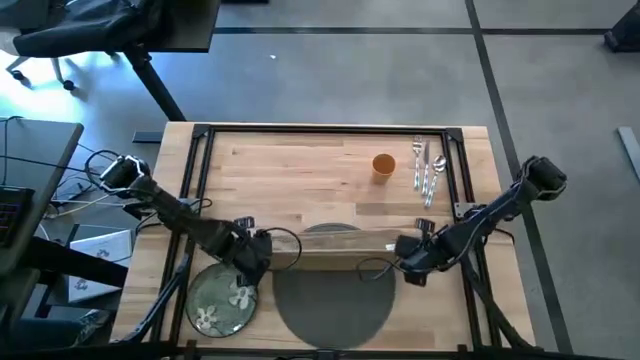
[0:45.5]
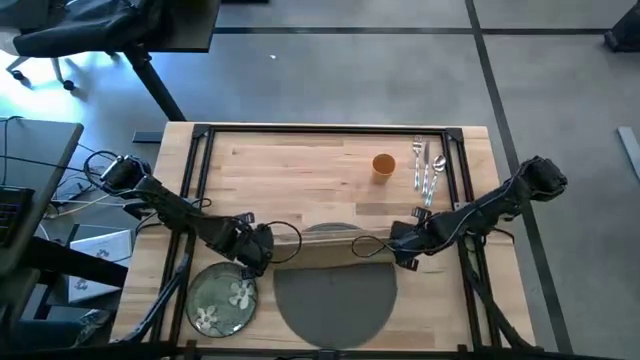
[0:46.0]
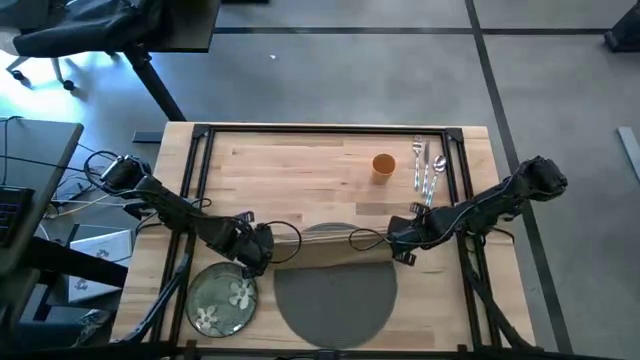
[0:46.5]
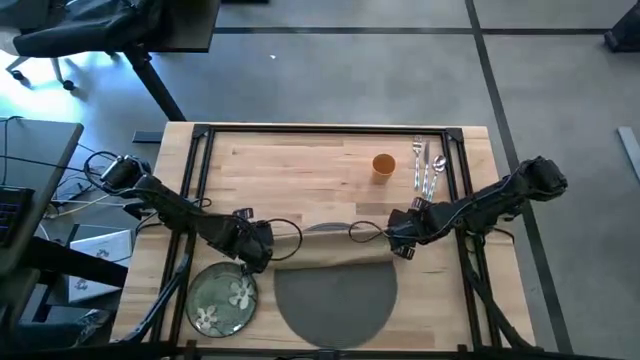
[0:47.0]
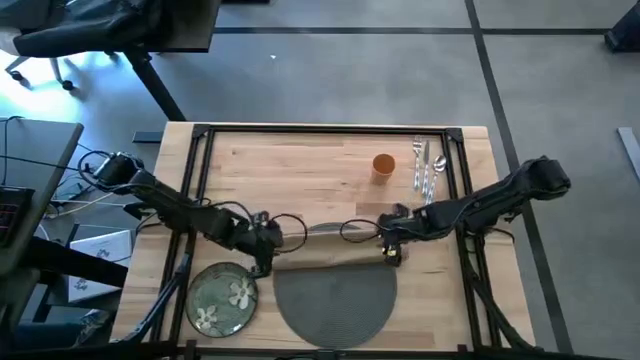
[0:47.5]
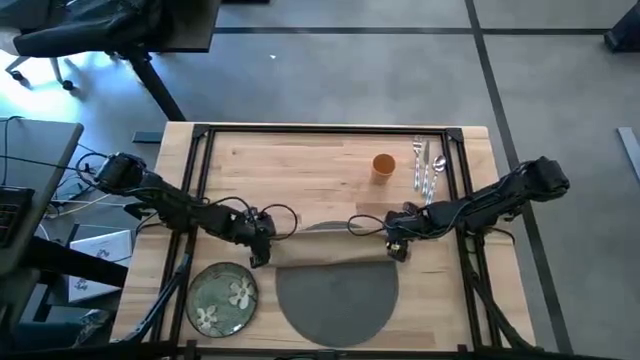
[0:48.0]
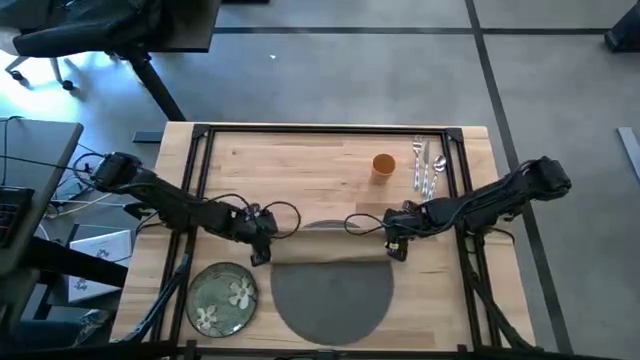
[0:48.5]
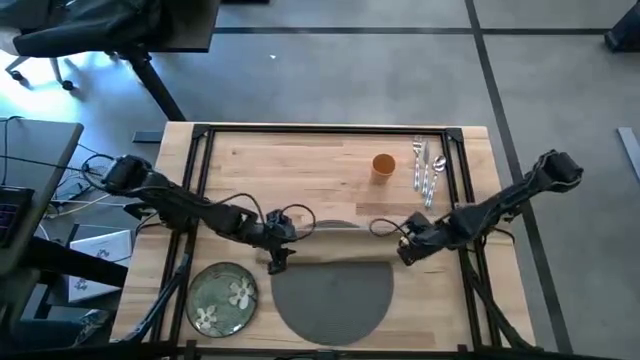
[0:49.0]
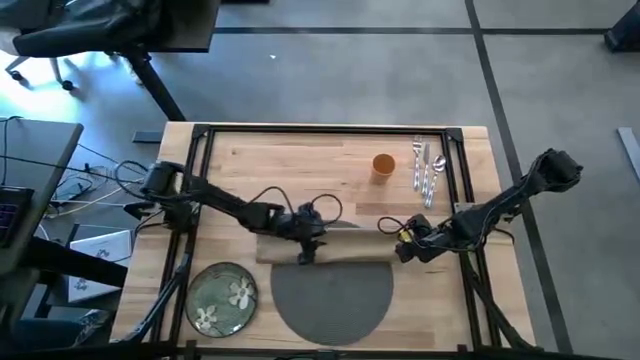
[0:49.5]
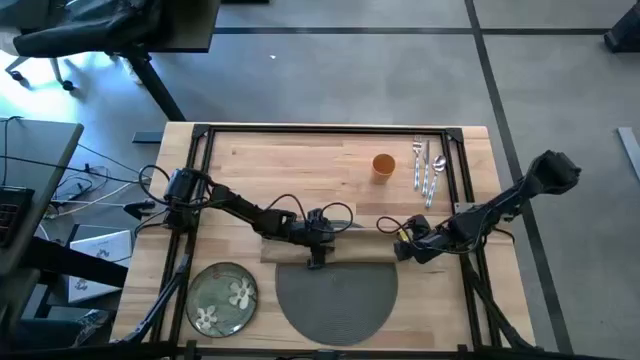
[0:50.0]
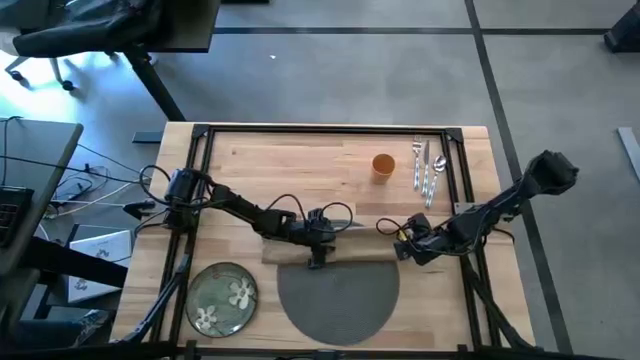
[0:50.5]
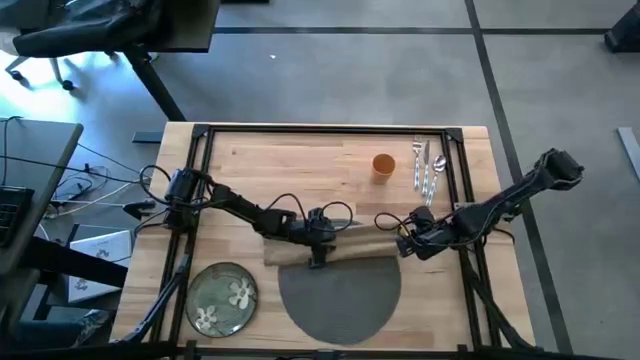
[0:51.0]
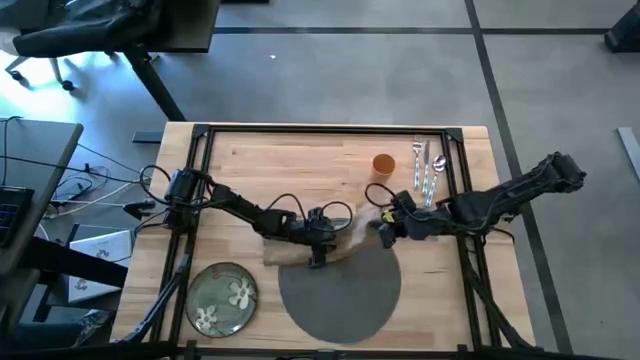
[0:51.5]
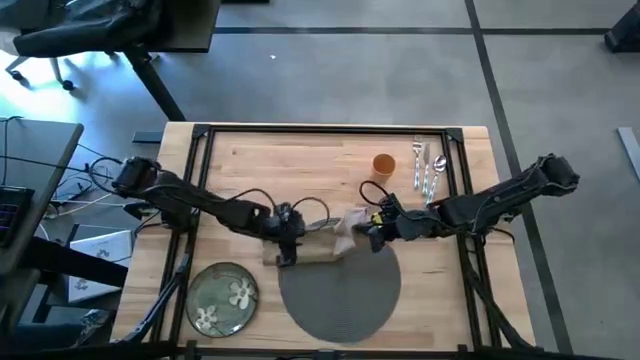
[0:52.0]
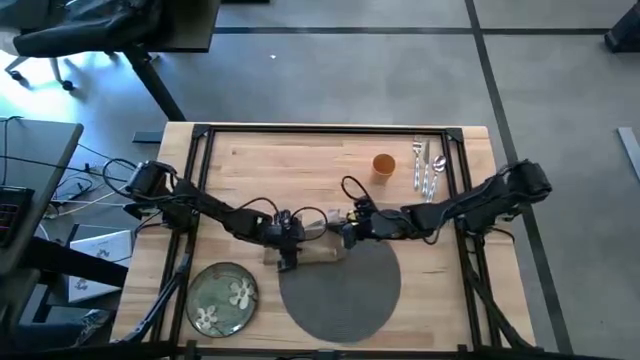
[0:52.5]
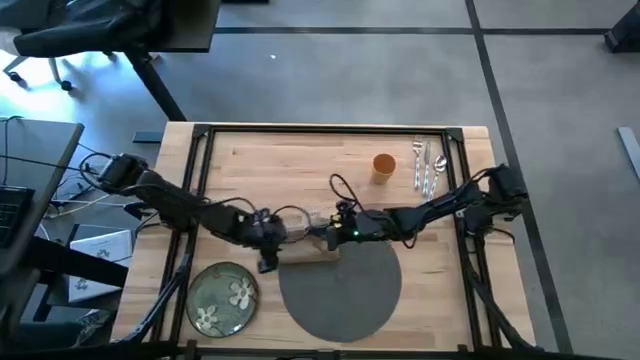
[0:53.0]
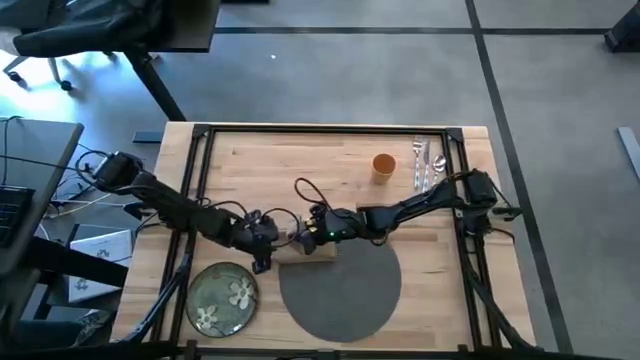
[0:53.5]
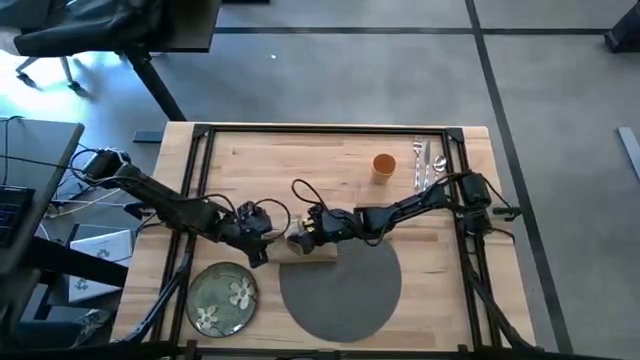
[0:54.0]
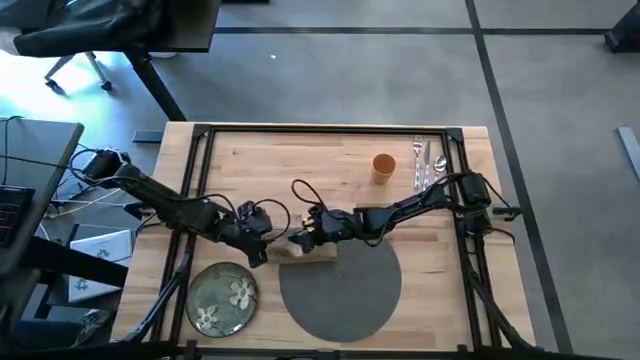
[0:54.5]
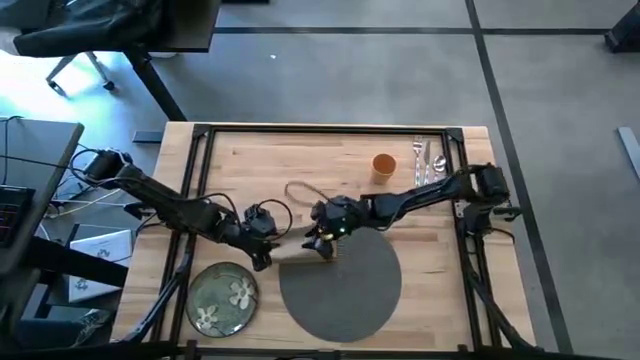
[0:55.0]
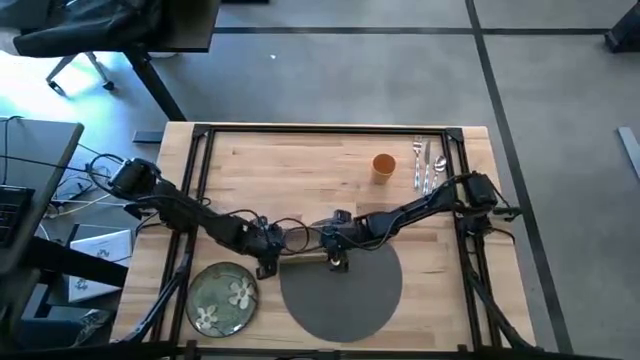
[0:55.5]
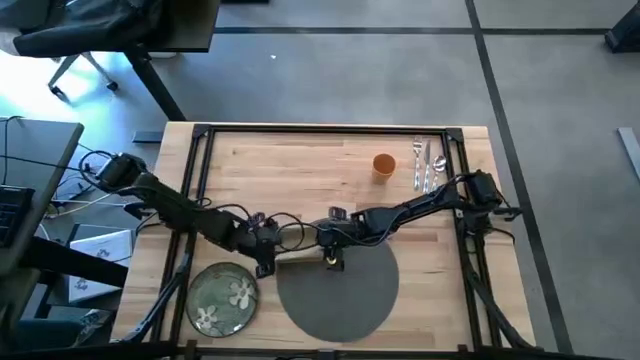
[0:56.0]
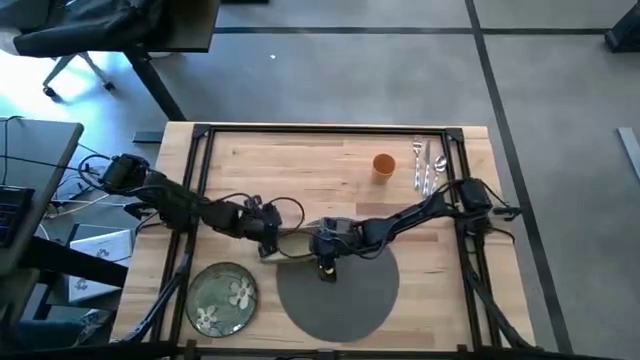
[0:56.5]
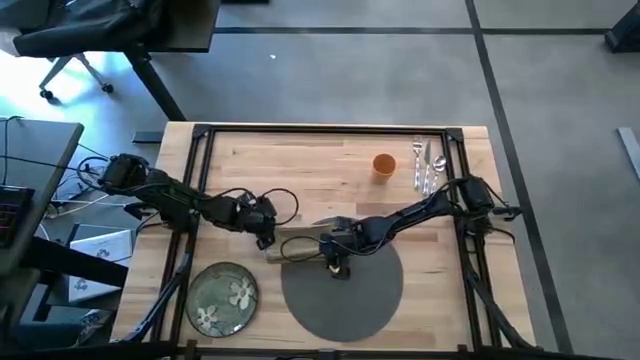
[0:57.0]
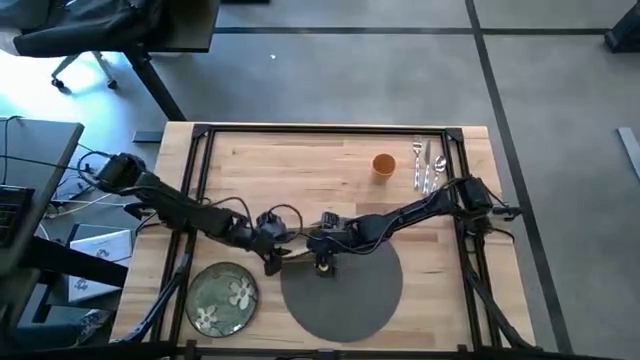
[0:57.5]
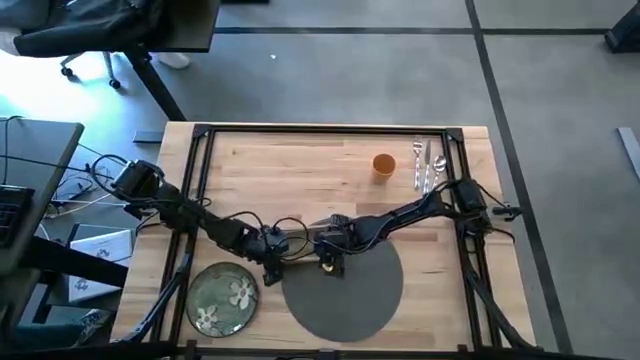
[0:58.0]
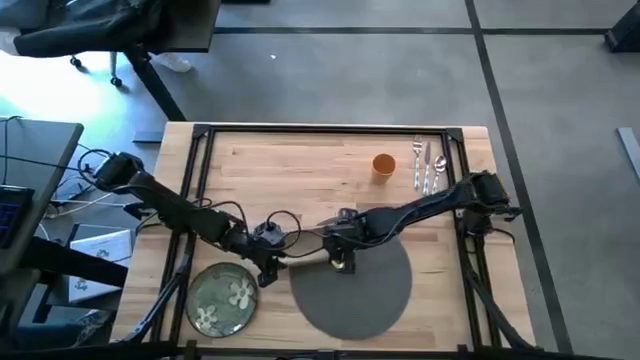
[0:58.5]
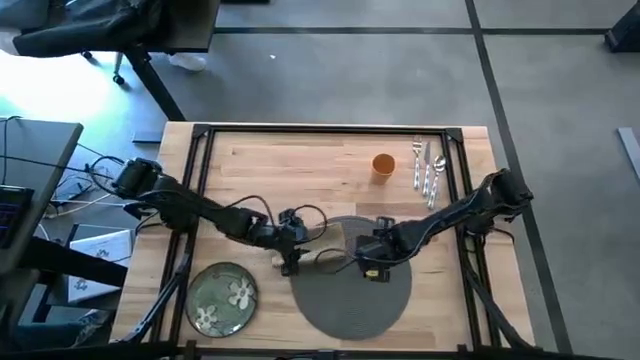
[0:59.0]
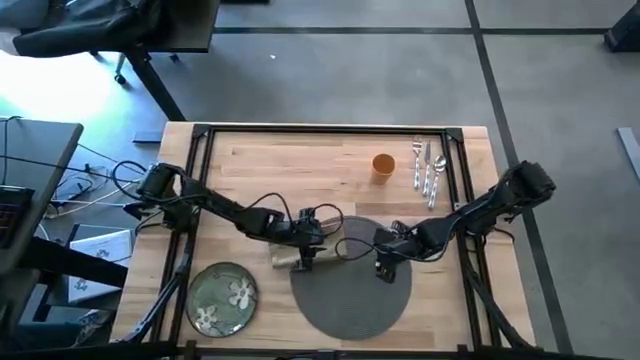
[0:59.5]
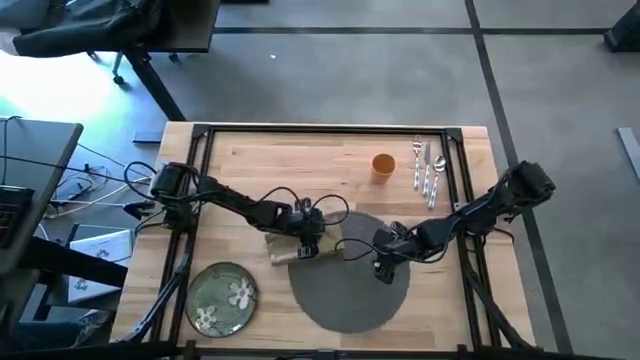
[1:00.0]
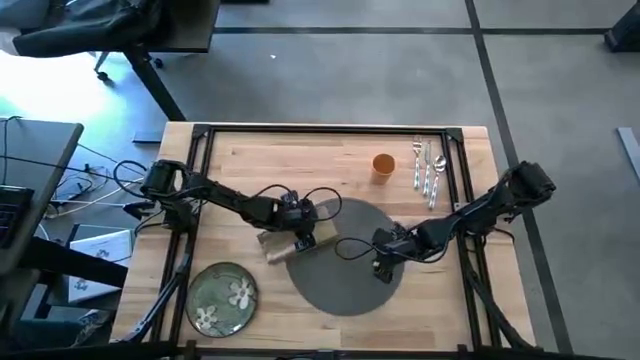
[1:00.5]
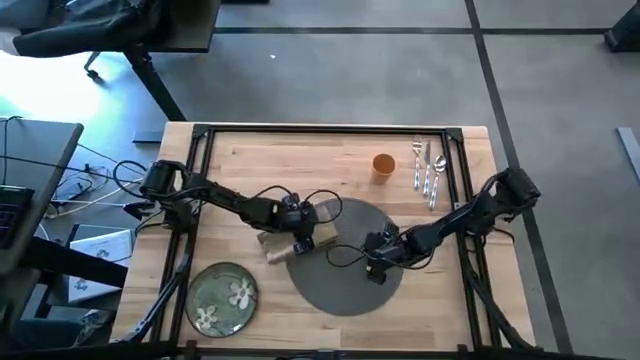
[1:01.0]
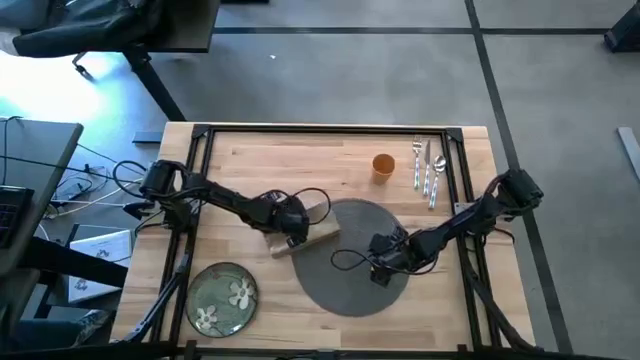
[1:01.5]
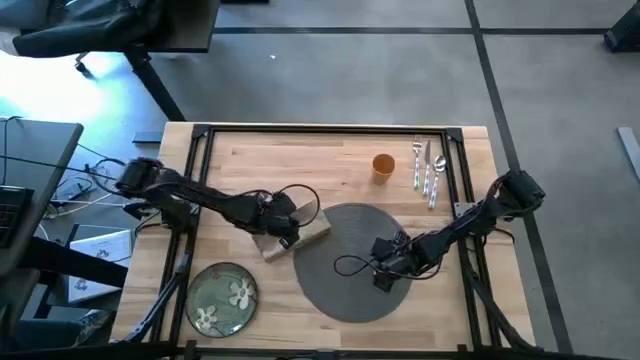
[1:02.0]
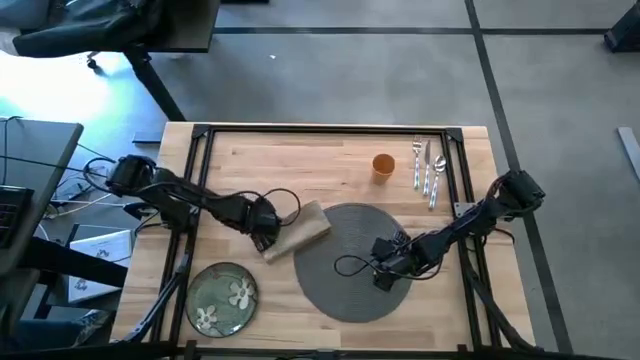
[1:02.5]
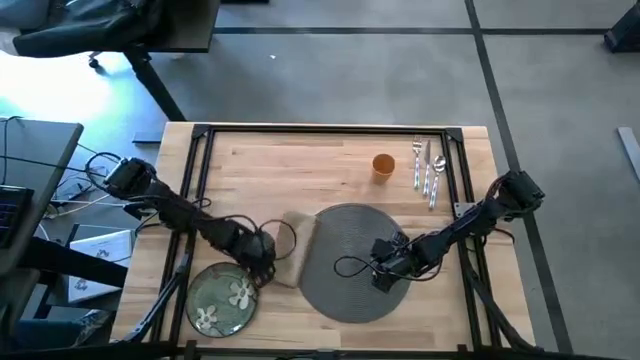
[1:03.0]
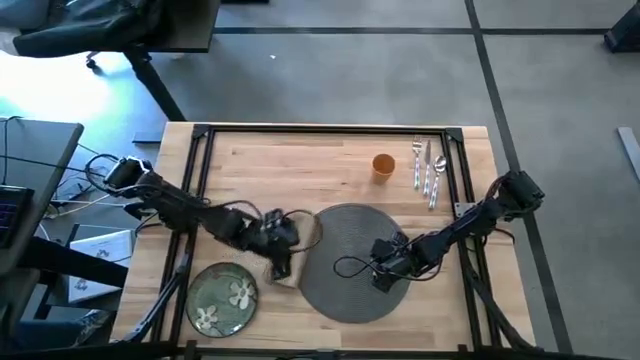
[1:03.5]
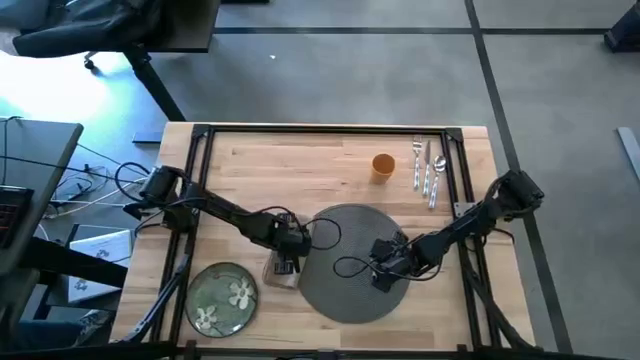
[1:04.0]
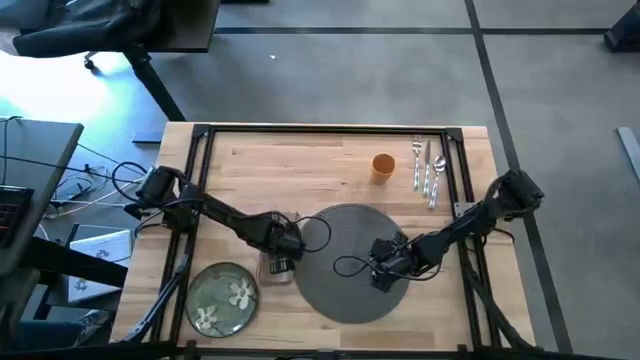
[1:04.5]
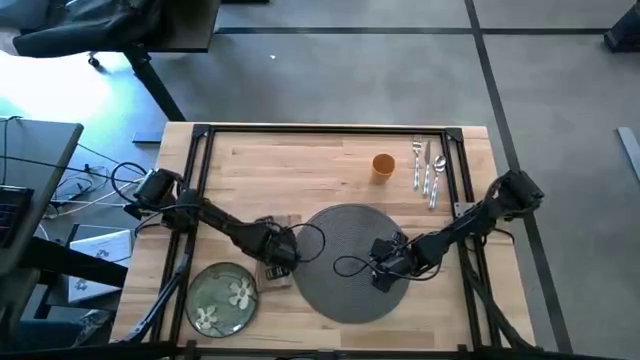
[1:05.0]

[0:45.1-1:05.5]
Task: Set table place
Fold the brown napkin
